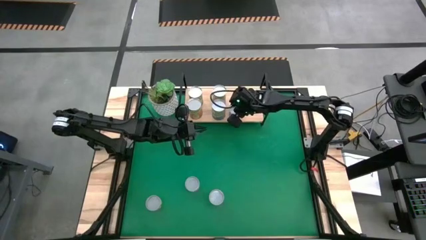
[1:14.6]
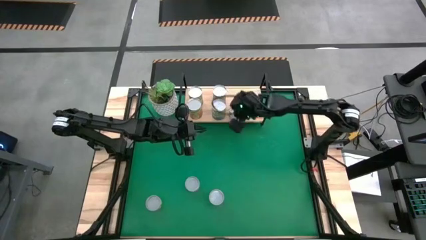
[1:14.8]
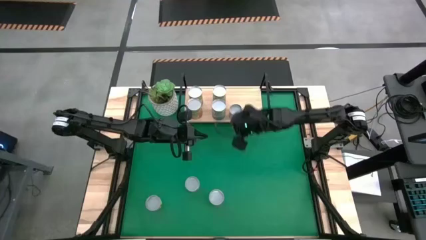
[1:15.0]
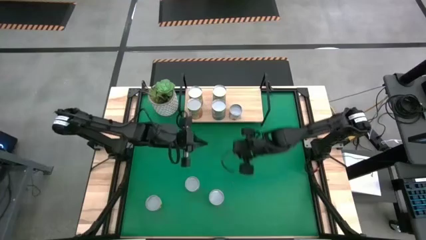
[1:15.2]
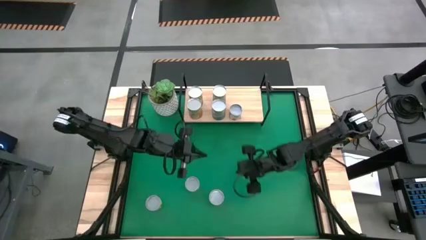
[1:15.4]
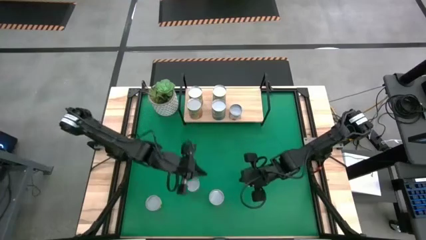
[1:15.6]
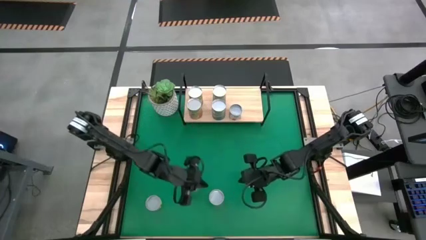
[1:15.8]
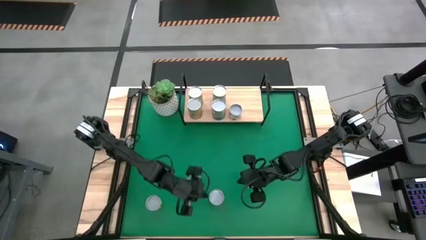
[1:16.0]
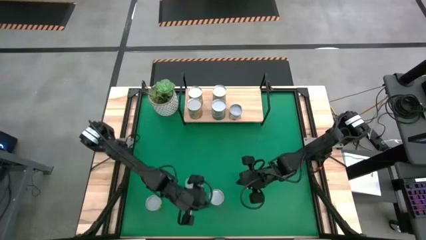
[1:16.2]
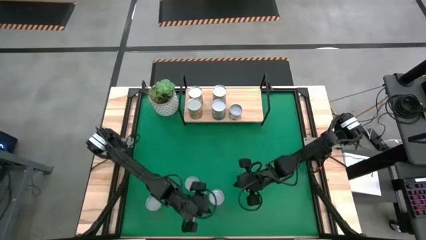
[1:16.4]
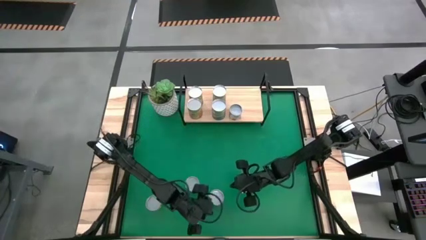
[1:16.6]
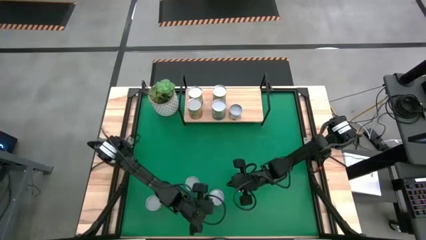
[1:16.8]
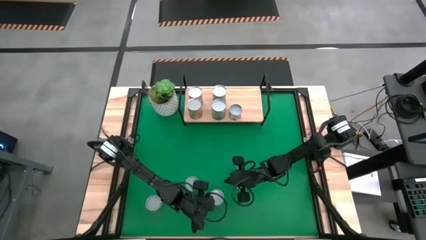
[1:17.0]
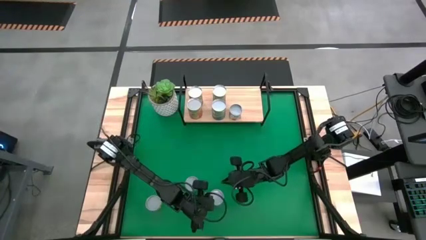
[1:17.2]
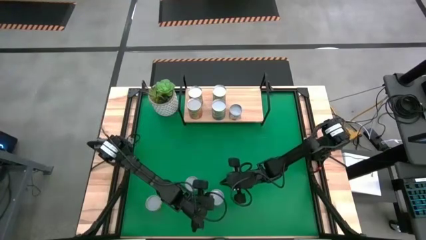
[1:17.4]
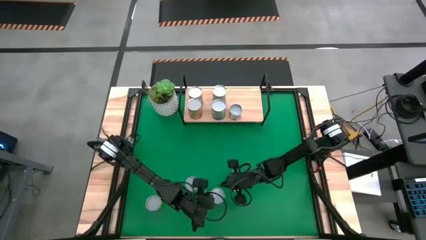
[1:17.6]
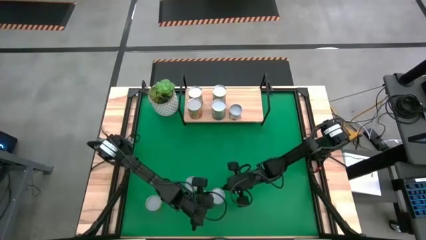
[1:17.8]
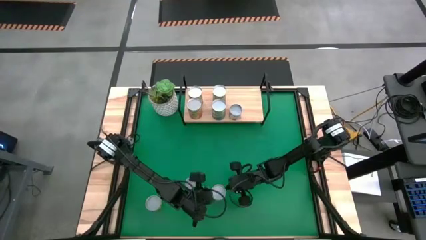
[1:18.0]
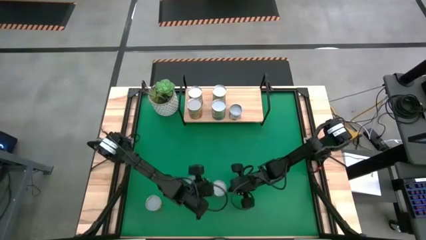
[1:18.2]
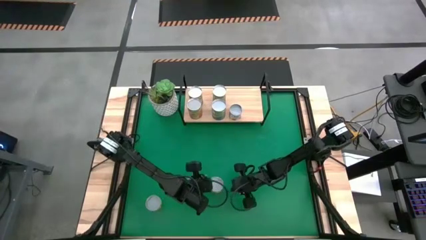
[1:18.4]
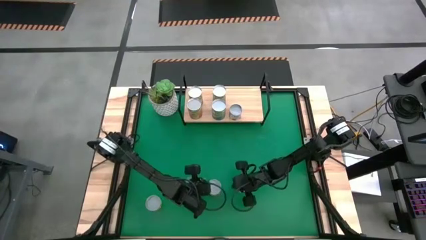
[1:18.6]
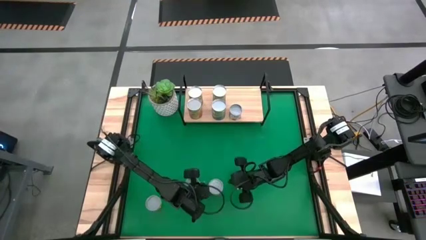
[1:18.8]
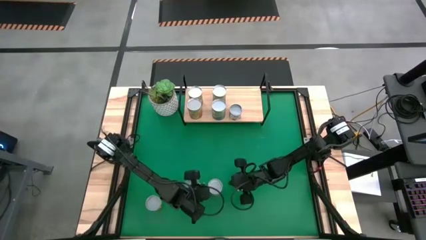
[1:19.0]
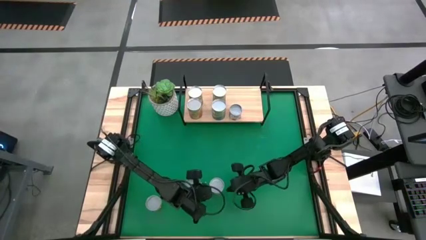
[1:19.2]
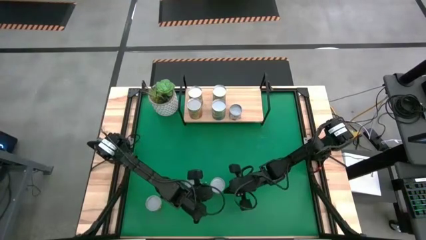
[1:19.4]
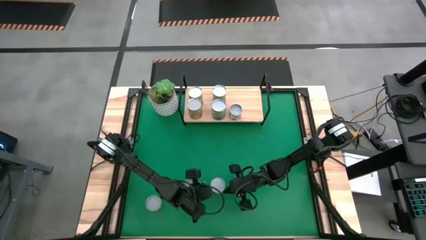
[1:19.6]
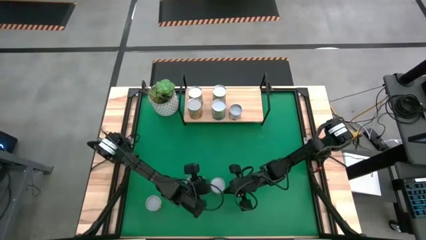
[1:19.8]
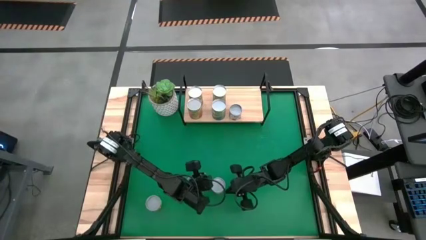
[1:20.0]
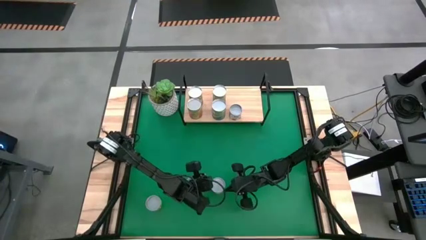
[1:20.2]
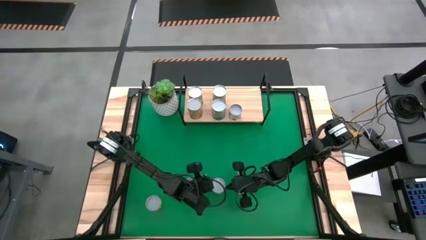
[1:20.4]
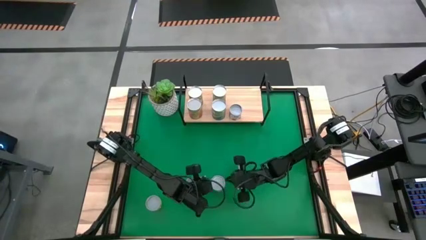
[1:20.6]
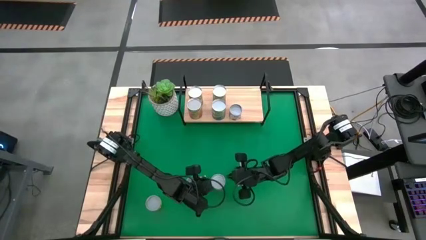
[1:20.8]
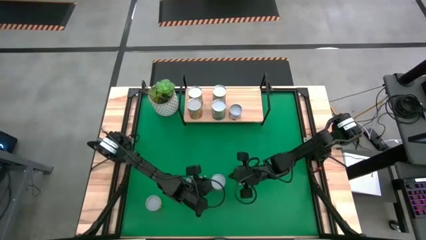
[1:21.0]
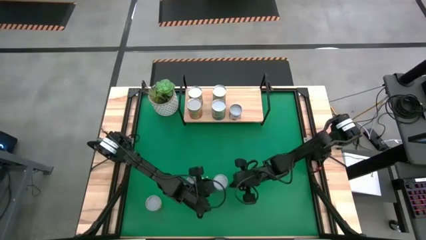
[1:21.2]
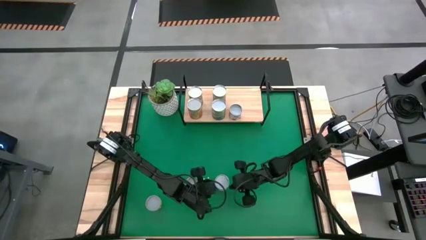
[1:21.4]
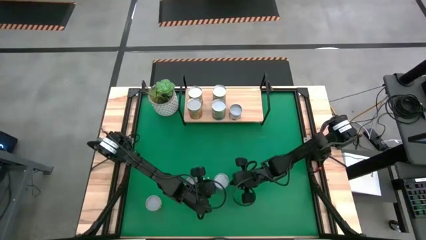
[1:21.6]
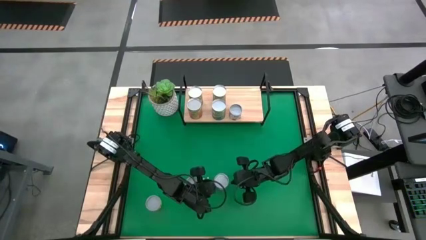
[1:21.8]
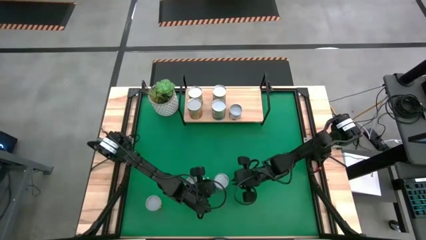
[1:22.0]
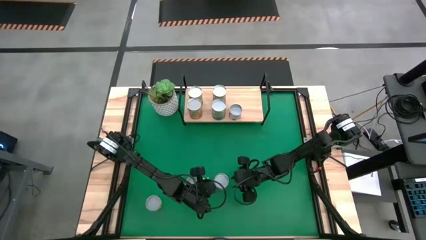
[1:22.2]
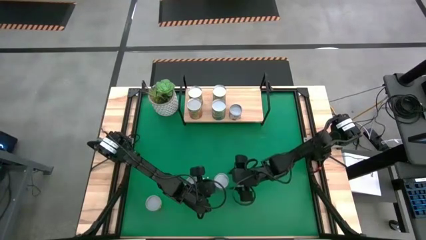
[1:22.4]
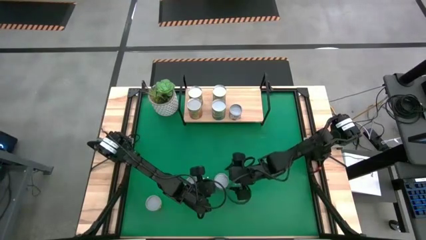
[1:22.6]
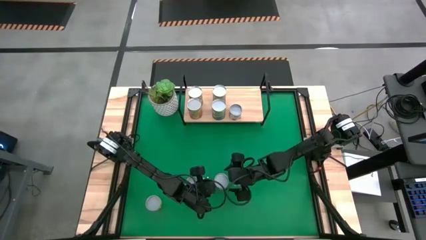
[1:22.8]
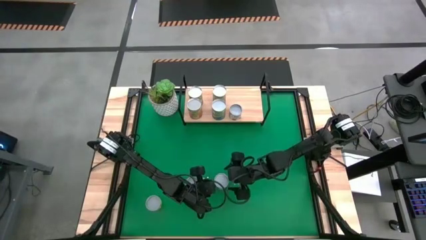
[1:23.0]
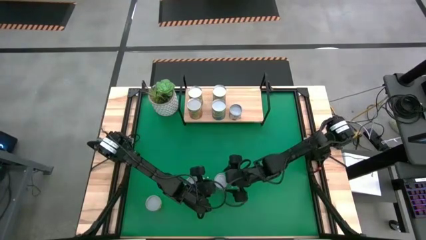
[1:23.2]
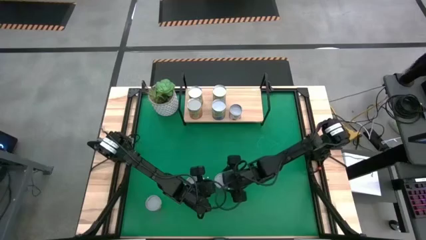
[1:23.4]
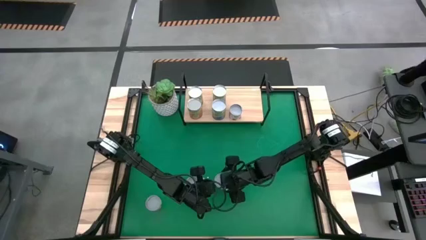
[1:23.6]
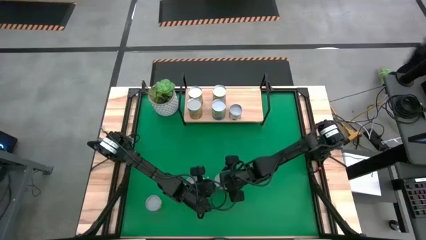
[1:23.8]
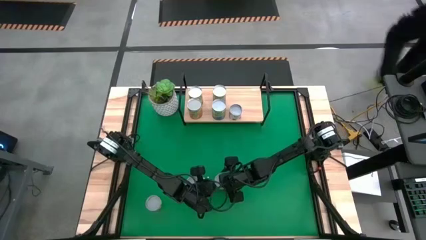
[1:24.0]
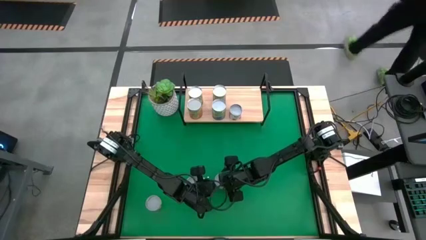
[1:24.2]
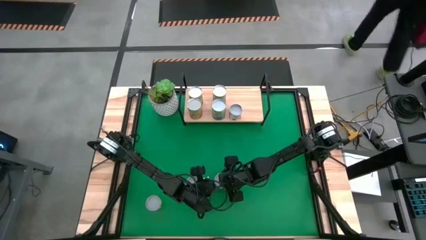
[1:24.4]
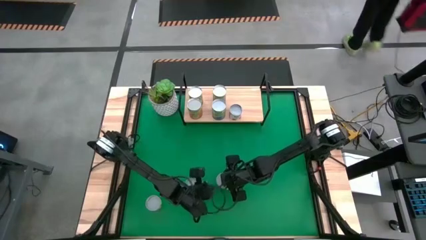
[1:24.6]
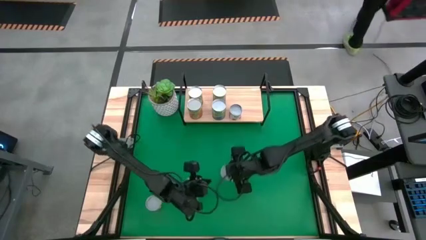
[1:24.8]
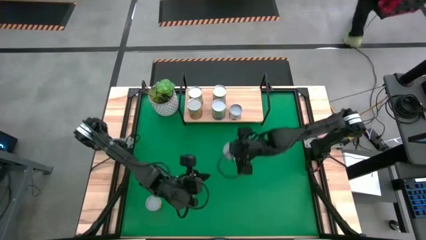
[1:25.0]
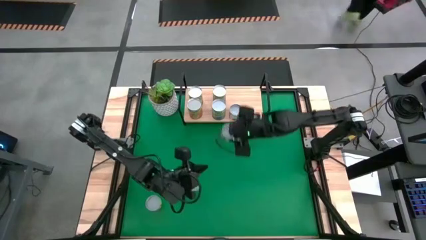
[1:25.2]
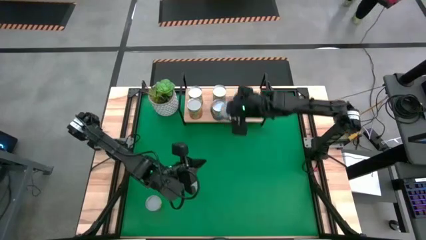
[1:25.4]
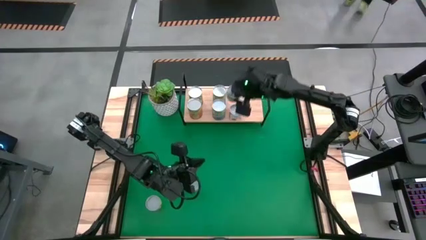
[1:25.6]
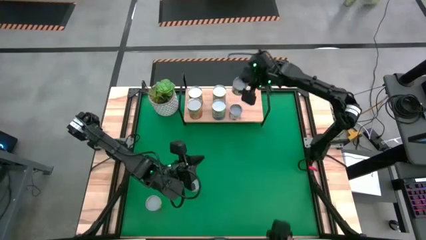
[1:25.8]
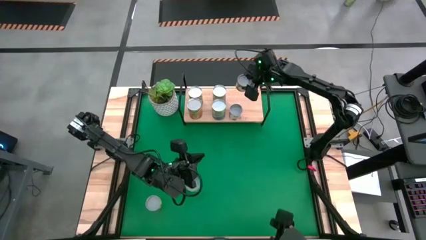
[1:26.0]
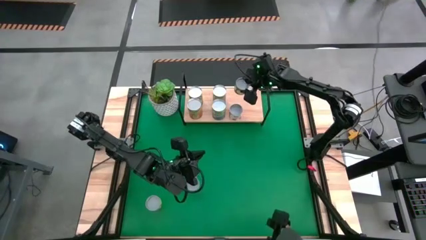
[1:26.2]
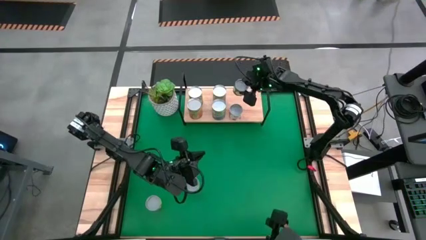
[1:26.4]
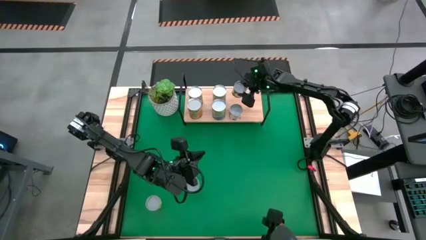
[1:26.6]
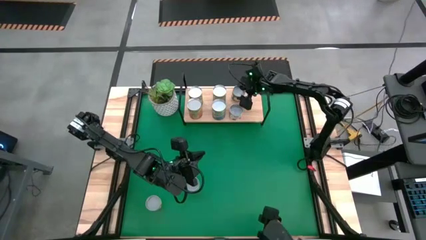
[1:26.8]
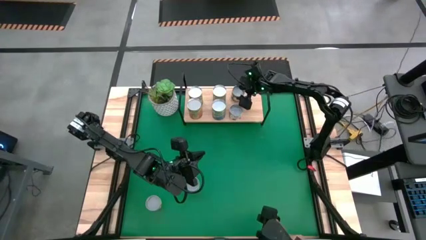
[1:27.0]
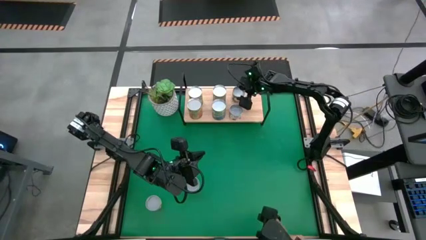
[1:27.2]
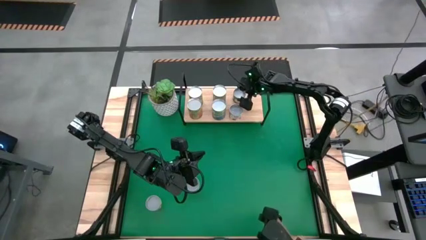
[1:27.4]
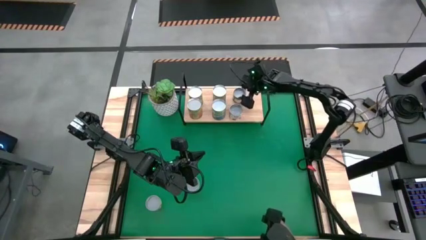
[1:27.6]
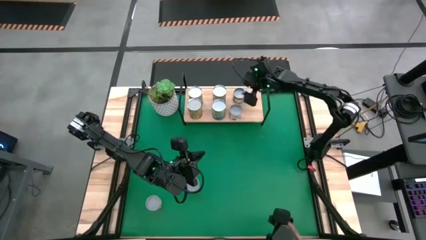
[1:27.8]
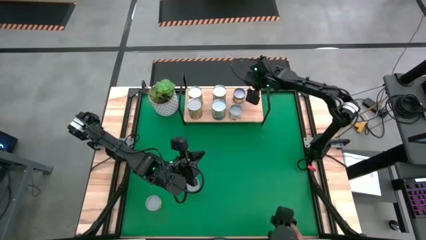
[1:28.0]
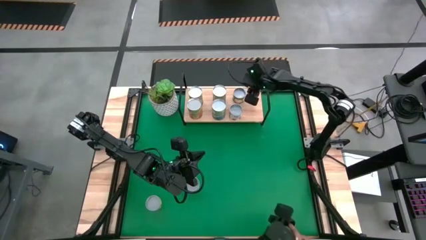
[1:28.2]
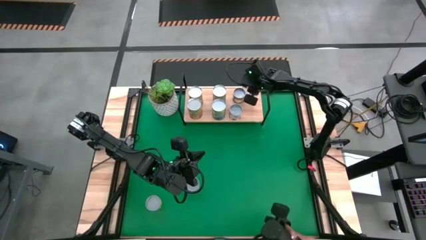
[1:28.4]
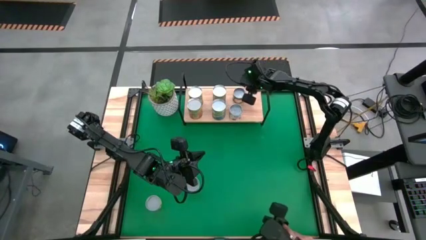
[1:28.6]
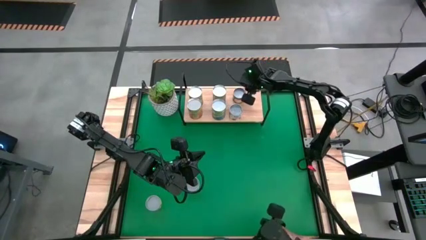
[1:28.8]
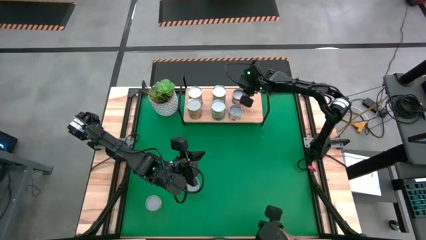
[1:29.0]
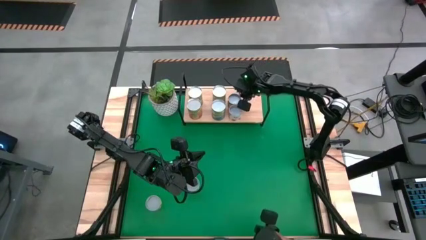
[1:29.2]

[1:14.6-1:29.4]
Task: Pick and place cans onto a shelf
Put the canned sliced peaches on the shelf
